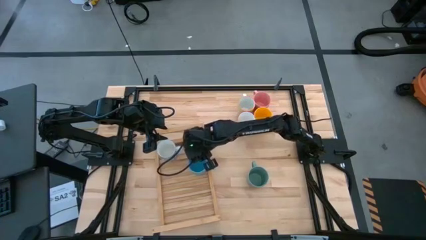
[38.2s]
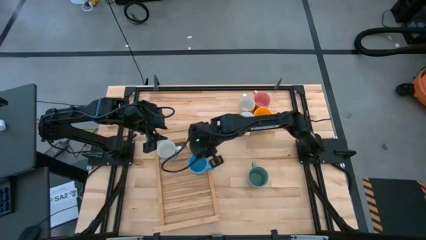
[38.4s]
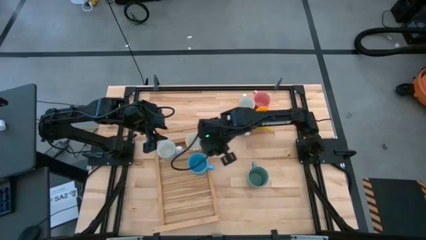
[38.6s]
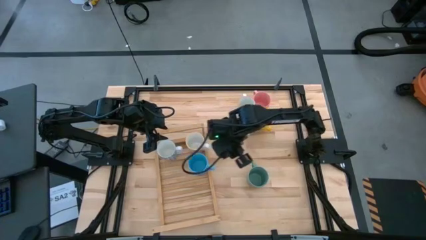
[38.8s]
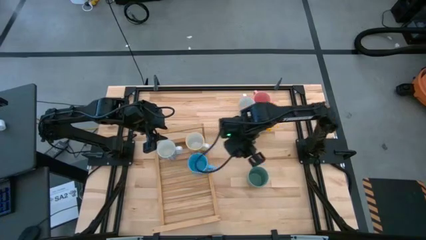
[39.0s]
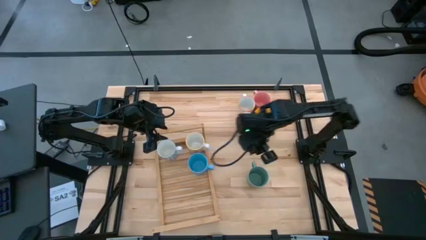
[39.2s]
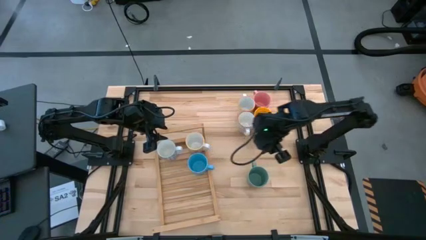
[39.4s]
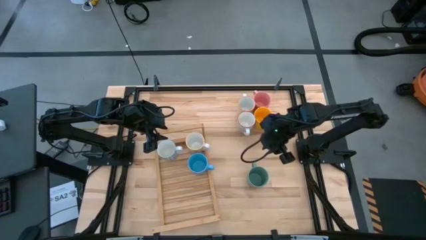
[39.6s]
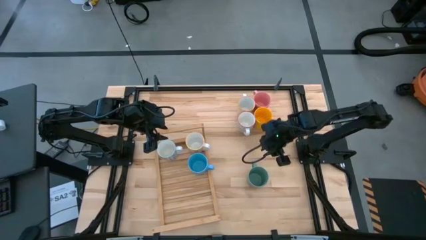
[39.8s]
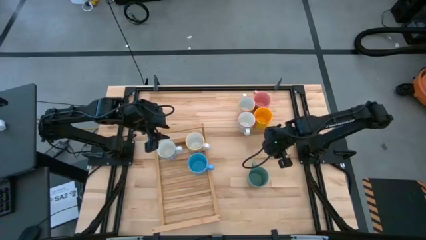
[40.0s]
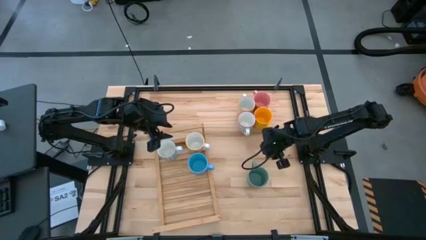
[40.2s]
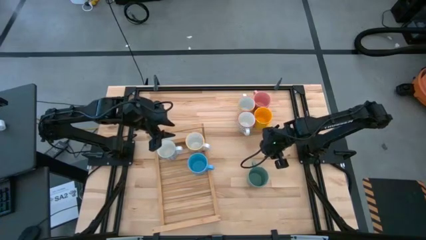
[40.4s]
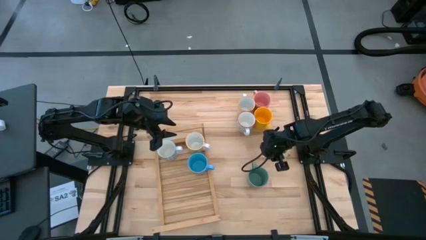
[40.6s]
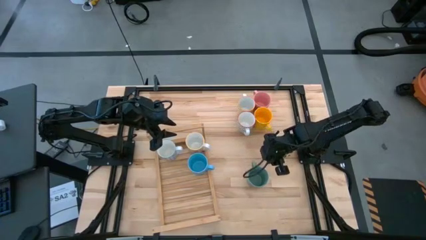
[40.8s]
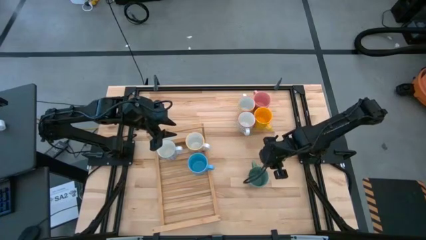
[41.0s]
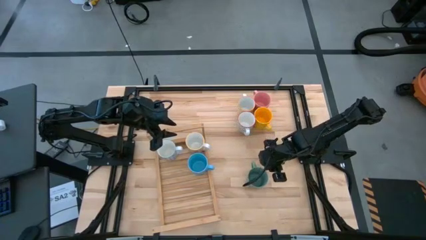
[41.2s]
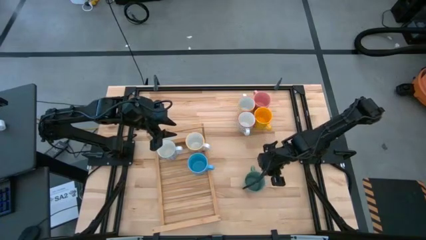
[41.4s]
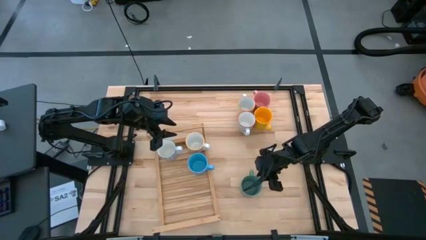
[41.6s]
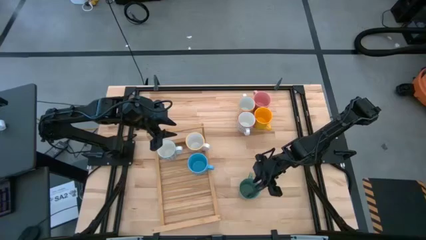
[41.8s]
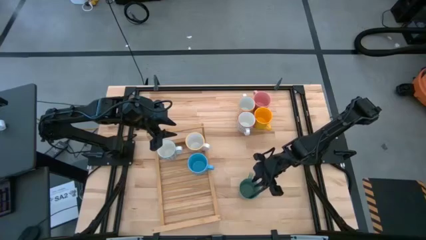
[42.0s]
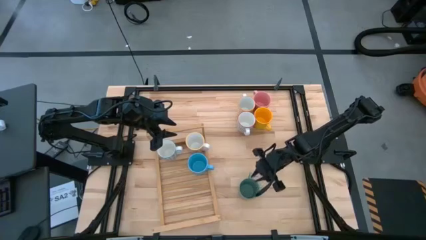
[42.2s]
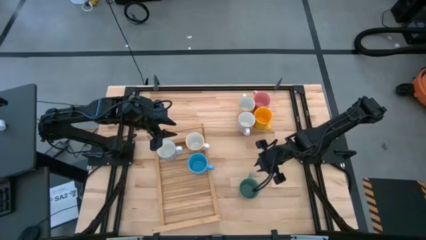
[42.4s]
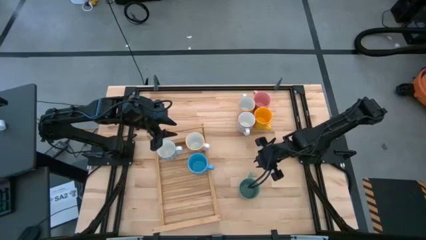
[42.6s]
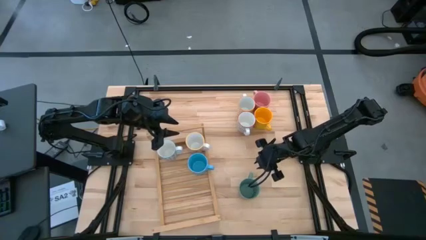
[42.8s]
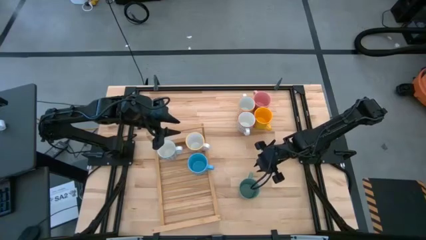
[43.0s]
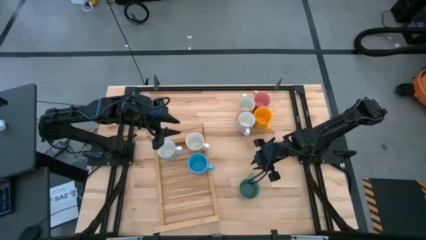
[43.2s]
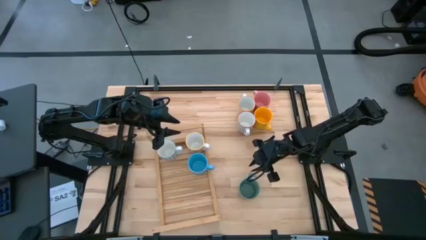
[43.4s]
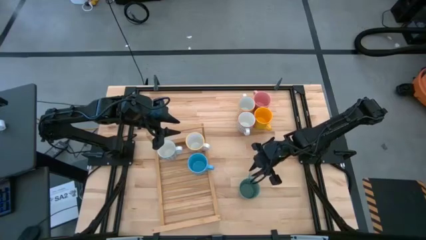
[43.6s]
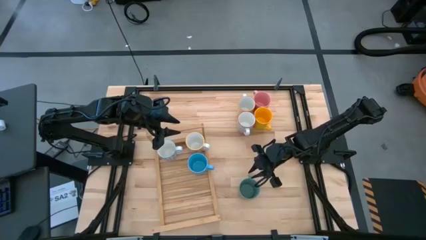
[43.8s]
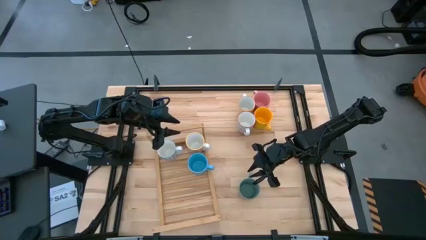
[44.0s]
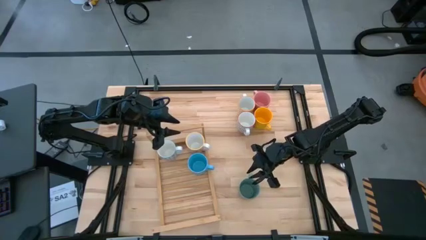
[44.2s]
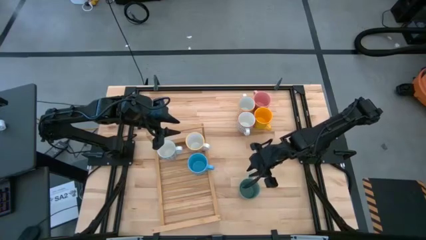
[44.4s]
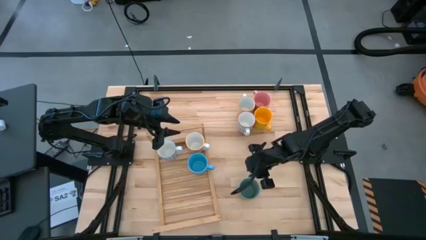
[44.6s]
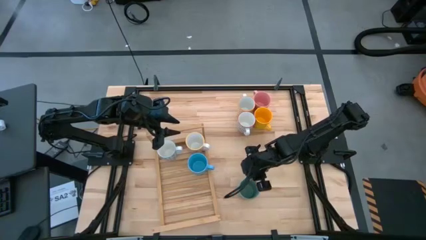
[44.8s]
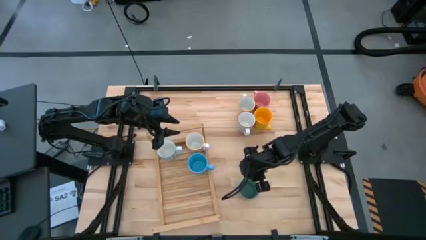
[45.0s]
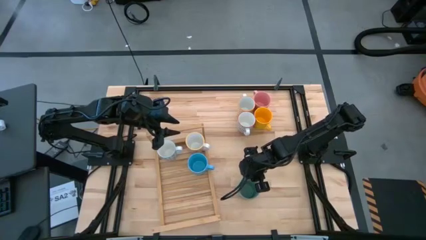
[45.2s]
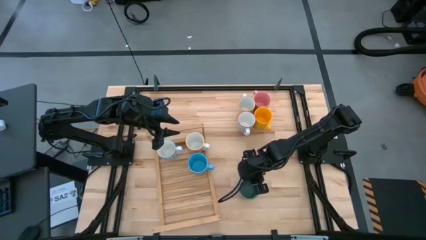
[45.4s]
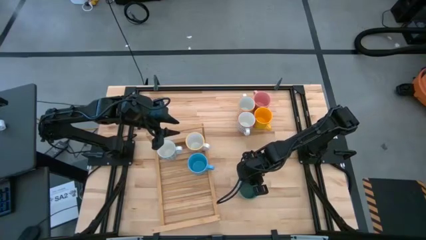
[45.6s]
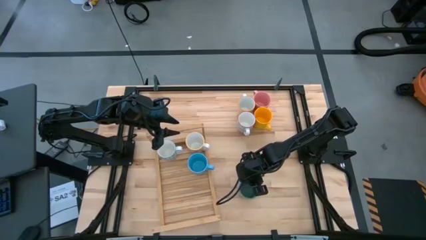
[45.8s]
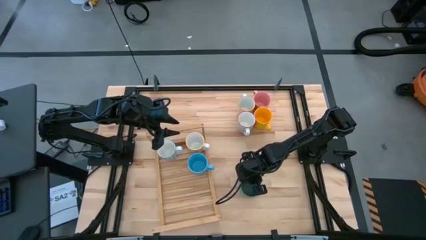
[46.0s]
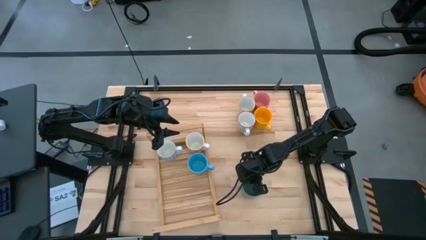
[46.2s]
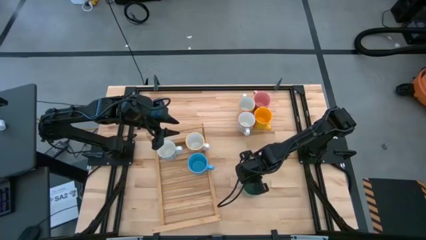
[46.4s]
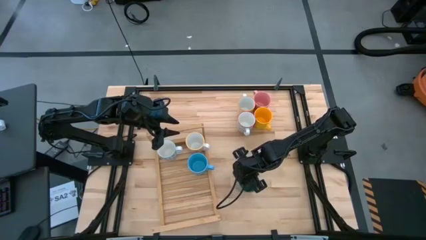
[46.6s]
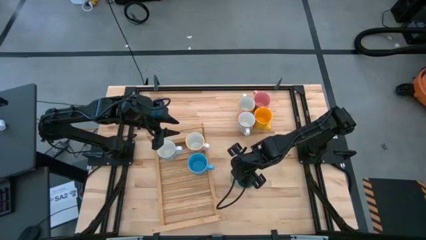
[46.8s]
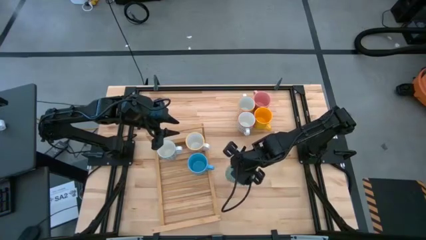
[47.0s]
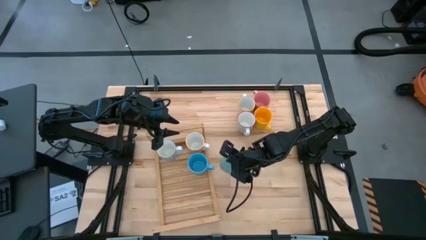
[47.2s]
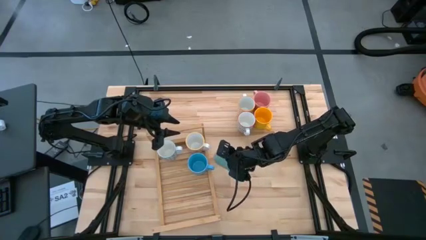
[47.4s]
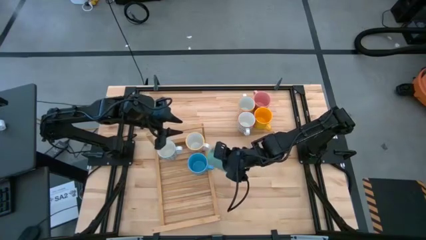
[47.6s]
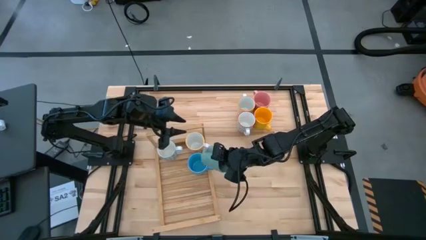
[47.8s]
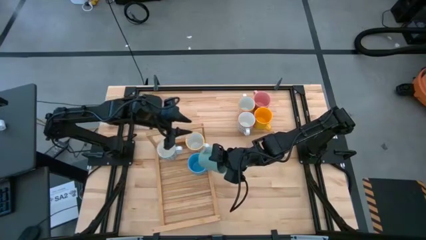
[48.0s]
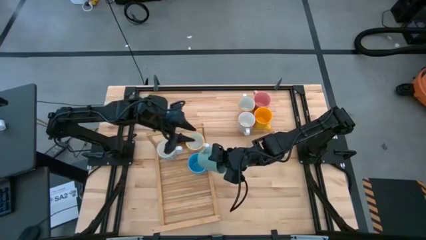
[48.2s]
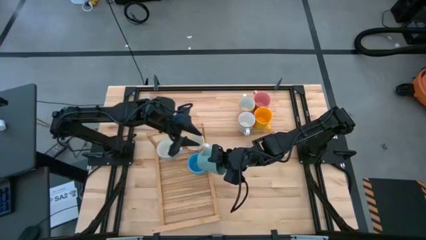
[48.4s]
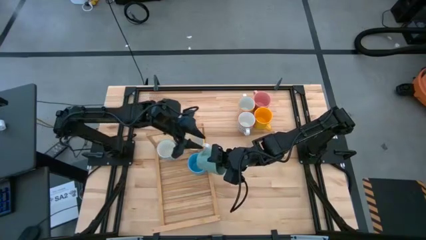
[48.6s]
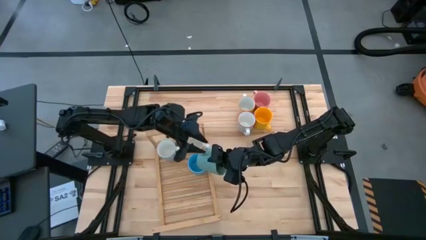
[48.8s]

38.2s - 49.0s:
Task: Place coffee mugs
Put the green mug on the shelf aligned with the light blue mug

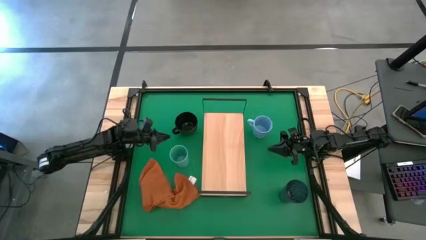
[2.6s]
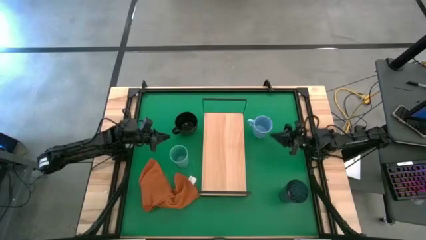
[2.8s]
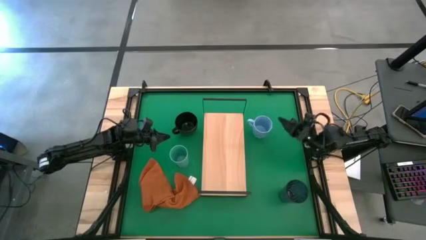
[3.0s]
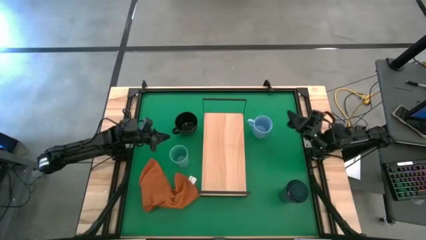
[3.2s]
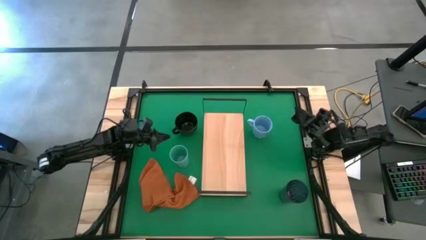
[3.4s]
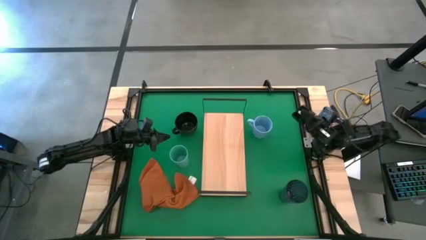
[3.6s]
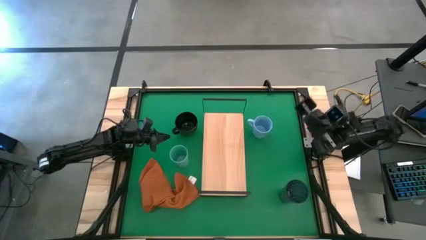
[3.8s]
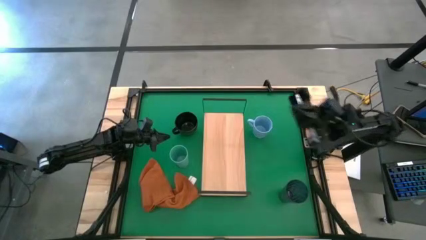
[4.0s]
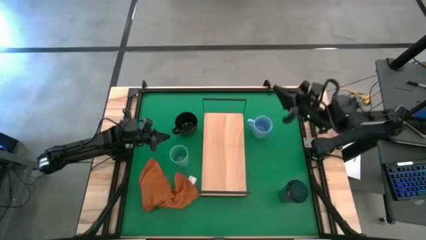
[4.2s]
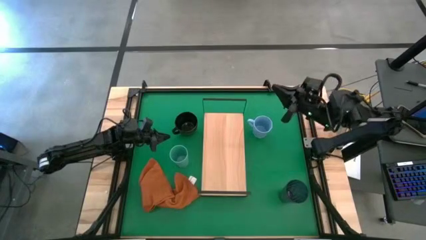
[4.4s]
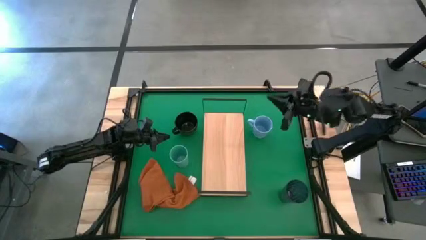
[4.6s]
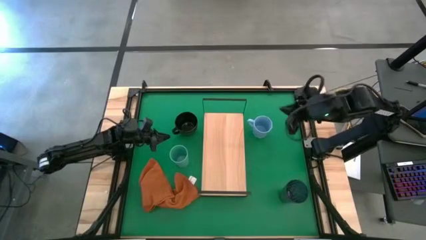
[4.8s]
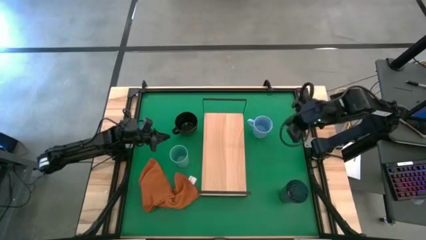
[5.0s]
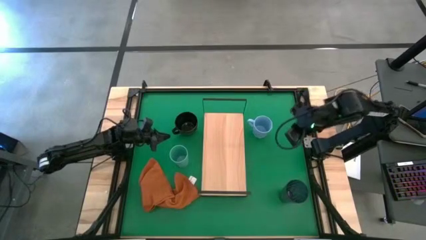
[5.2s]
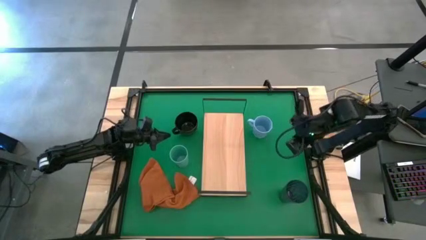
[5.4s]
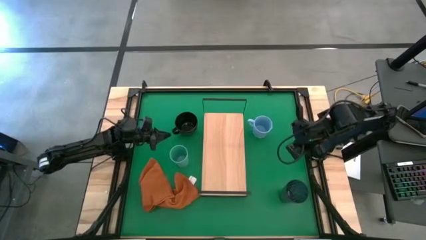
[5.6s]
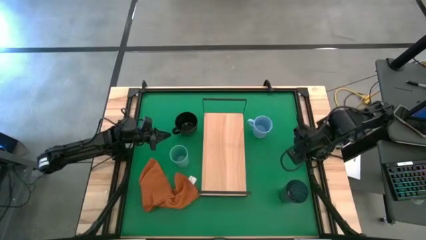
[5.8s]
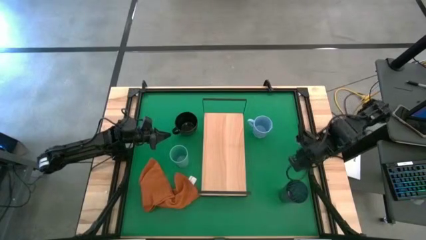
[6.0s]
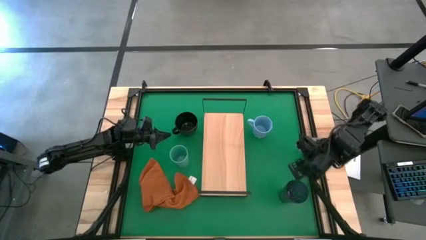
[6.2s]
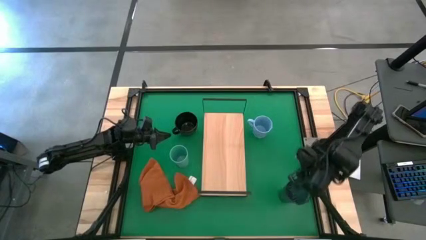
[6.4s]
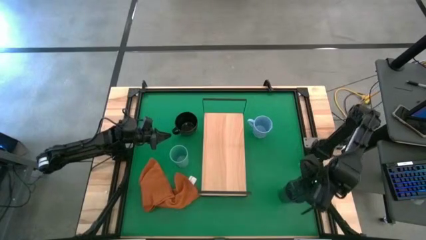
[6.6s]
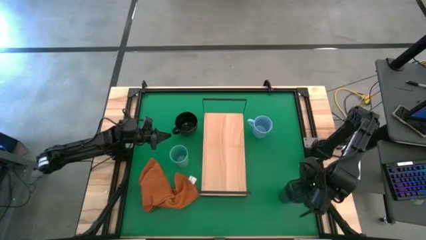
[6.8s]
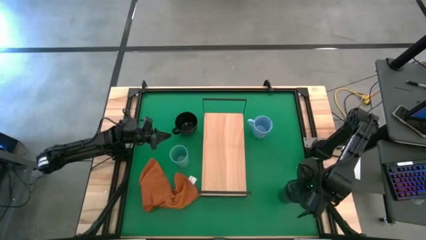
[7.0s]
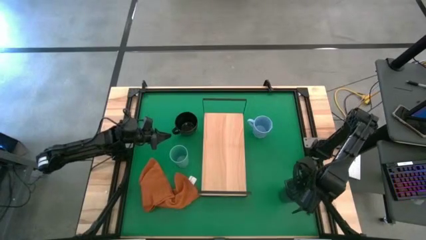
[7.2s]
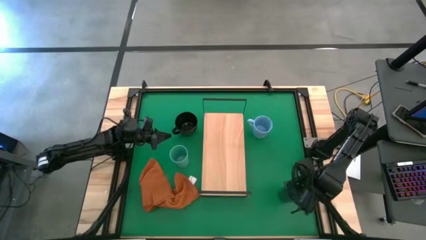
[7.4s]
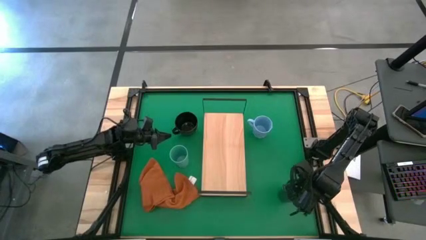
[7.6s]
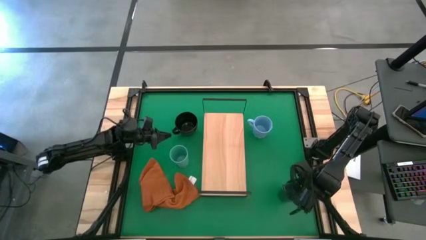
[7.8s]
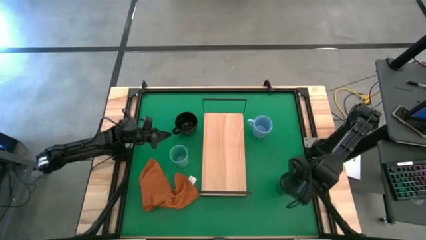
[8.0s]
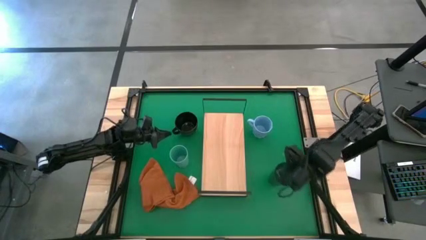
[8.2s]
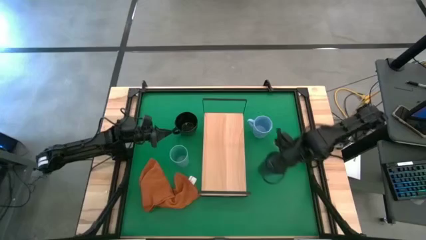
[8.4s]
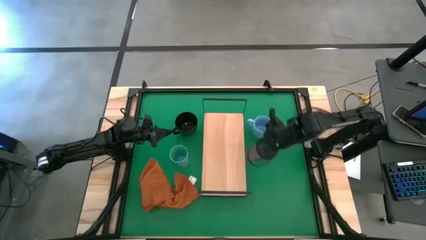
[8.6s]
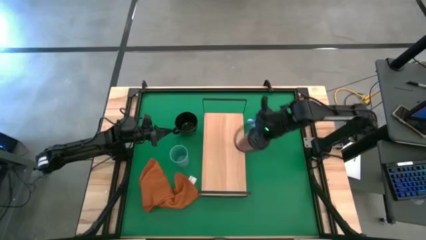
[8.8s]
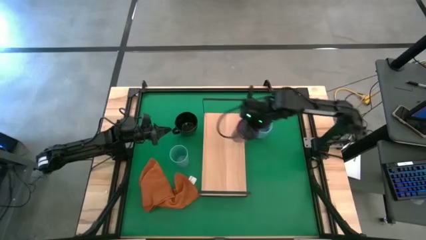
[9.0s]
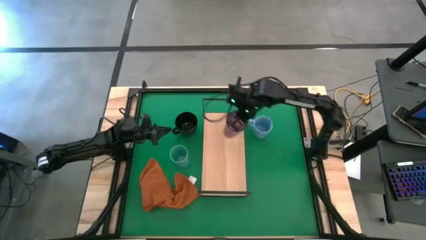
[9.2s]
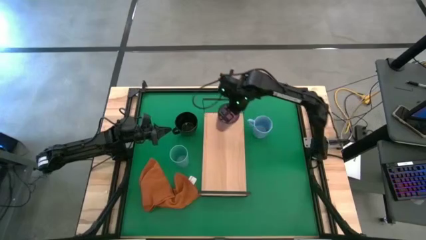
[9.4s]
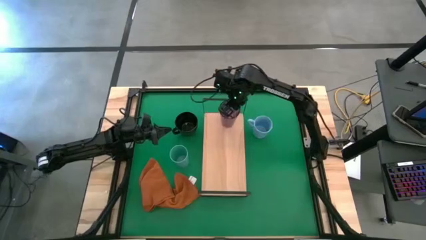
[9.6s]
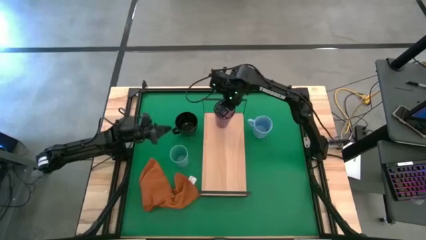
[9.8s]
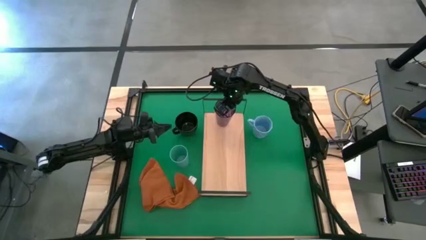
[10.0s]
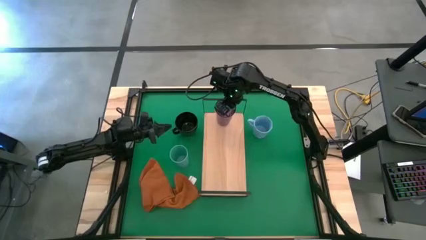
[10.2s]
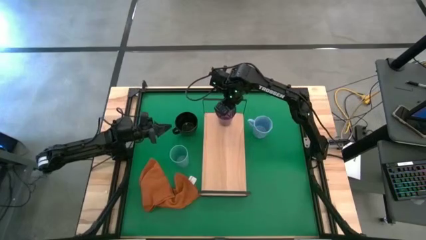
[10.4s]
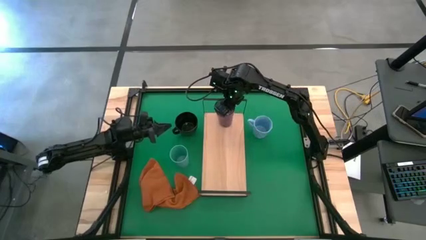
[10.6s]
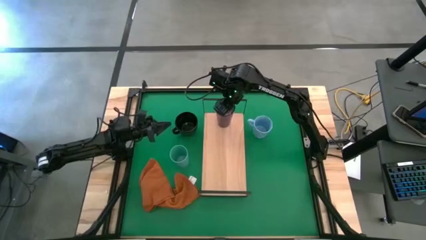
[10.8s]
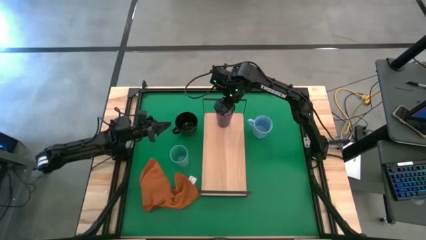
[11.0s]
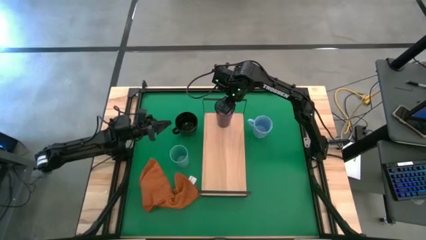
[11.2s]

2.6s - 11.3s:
Task: Stack small to large cups/mugs on shelf
Put the purple glass cup on the shelf
